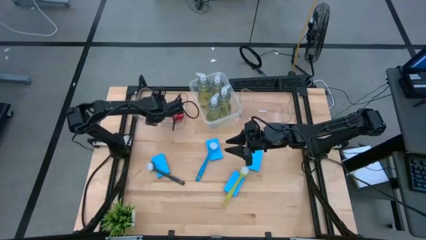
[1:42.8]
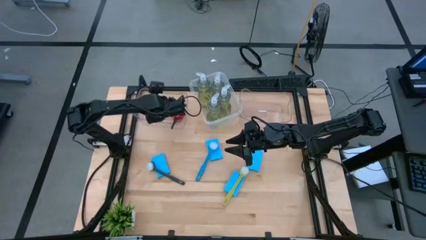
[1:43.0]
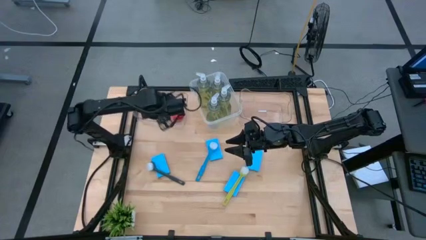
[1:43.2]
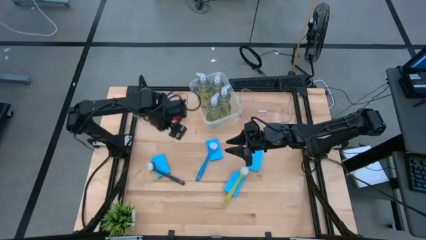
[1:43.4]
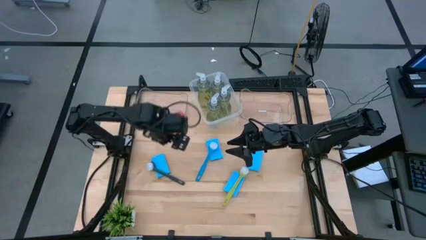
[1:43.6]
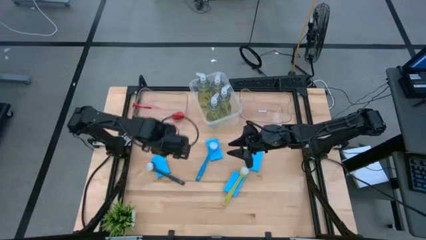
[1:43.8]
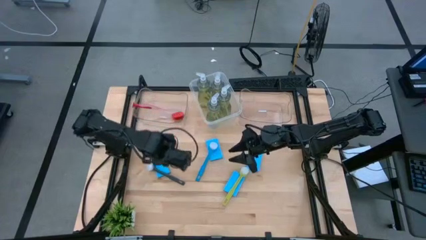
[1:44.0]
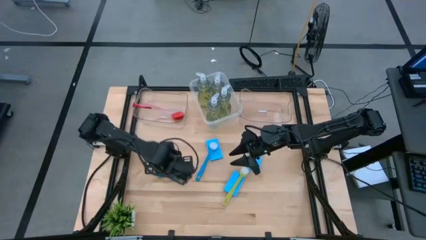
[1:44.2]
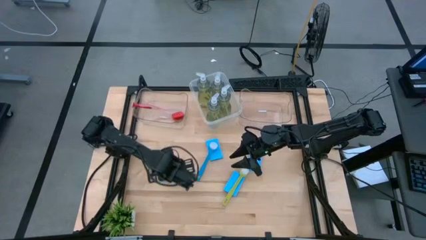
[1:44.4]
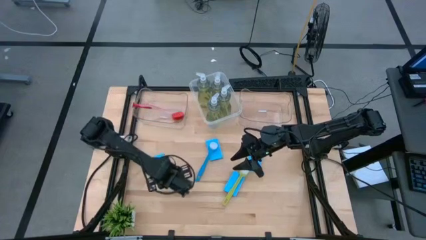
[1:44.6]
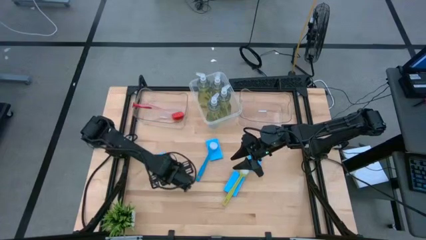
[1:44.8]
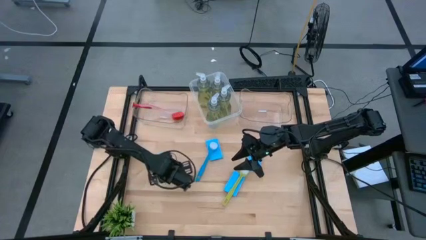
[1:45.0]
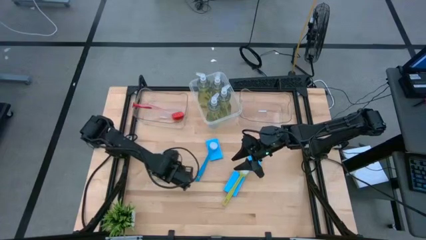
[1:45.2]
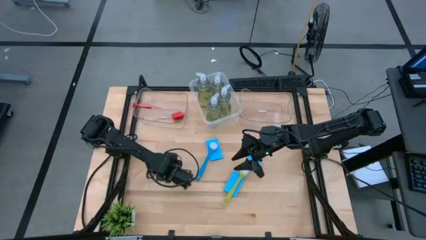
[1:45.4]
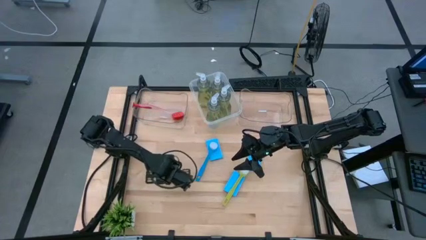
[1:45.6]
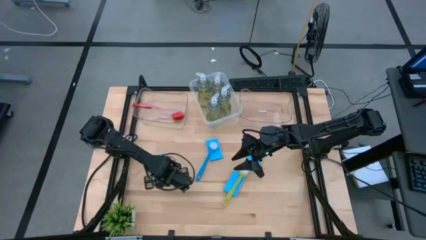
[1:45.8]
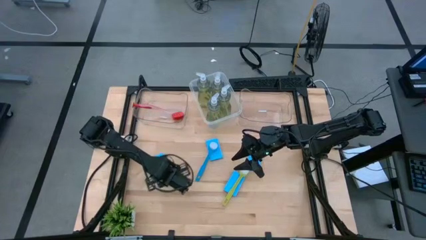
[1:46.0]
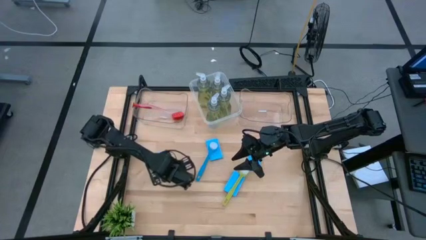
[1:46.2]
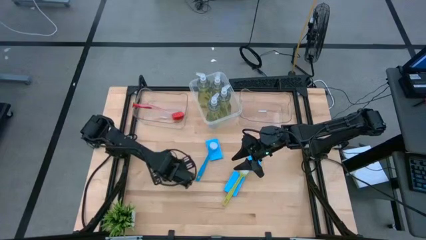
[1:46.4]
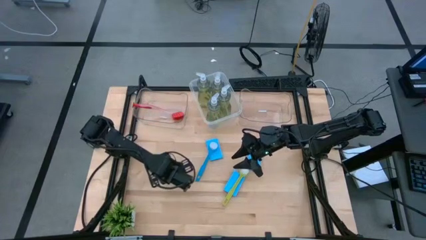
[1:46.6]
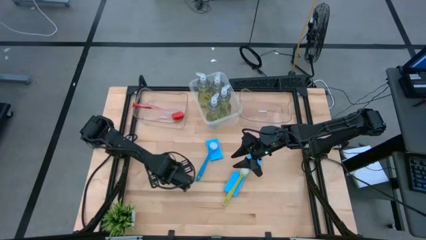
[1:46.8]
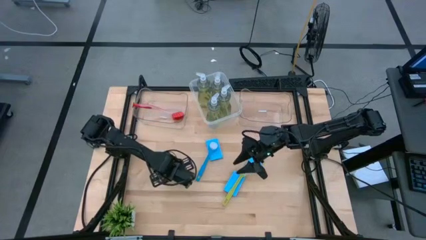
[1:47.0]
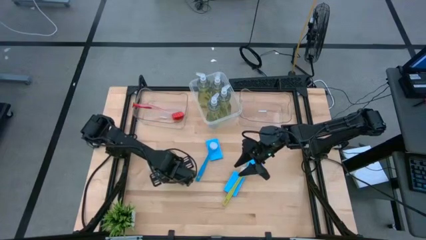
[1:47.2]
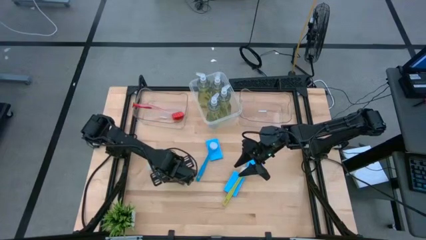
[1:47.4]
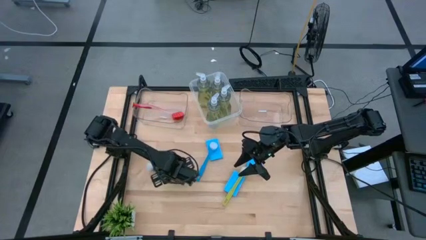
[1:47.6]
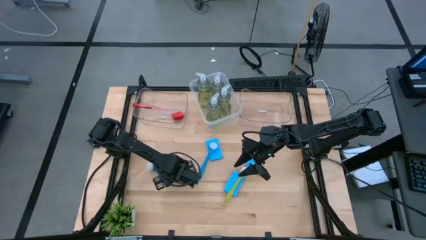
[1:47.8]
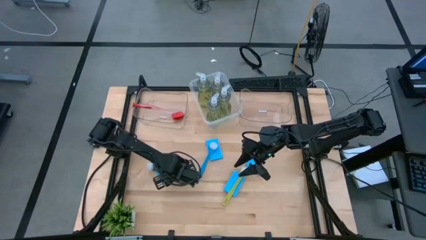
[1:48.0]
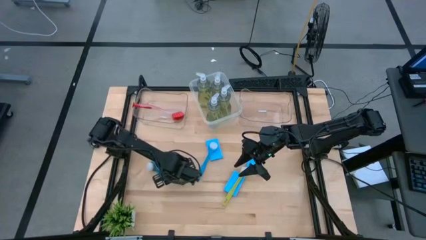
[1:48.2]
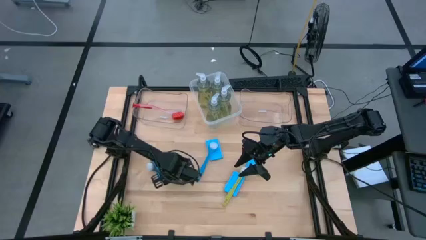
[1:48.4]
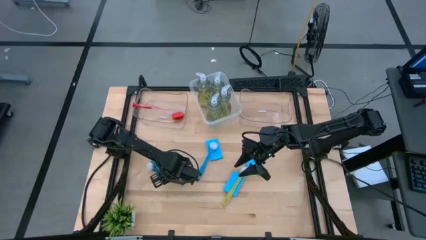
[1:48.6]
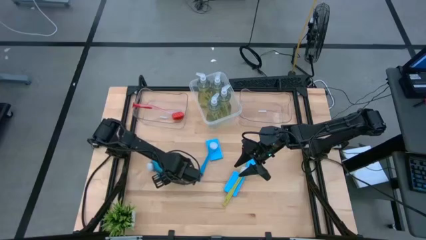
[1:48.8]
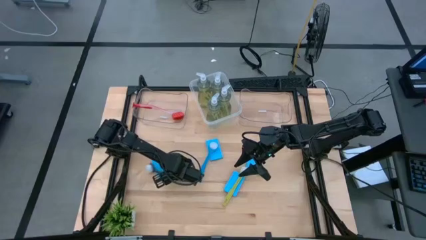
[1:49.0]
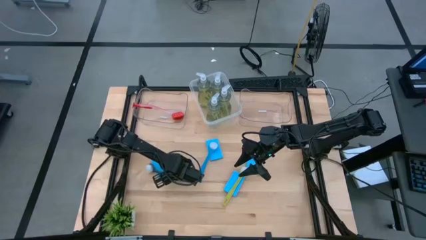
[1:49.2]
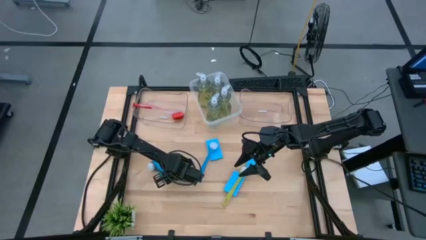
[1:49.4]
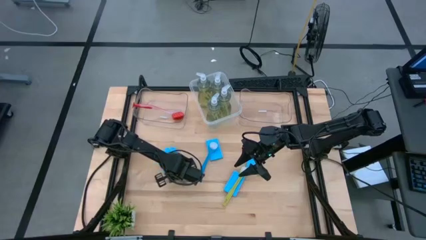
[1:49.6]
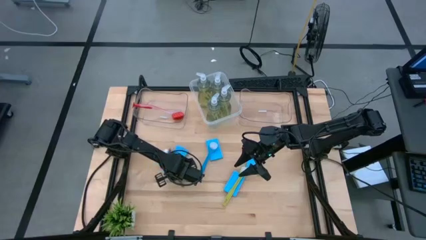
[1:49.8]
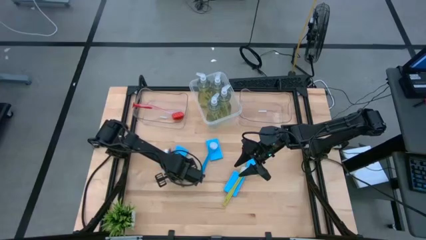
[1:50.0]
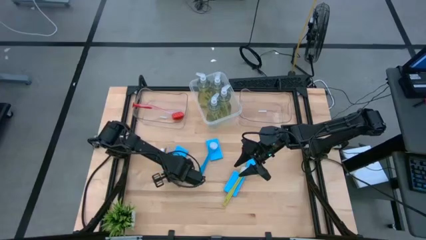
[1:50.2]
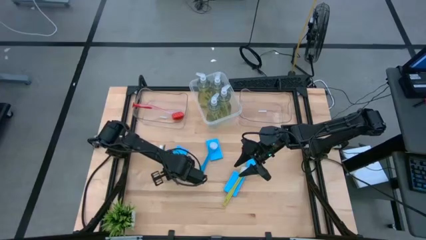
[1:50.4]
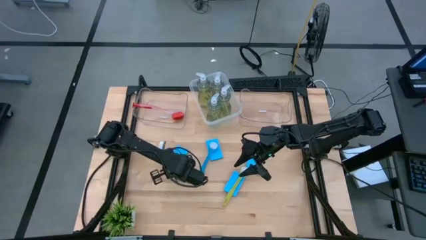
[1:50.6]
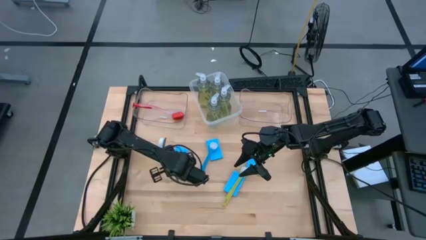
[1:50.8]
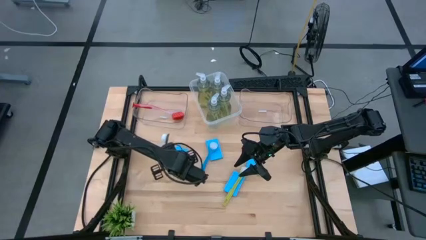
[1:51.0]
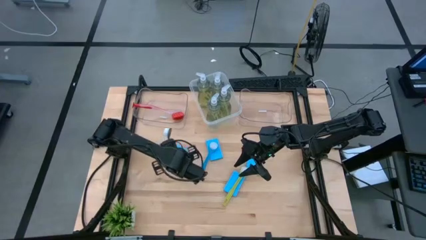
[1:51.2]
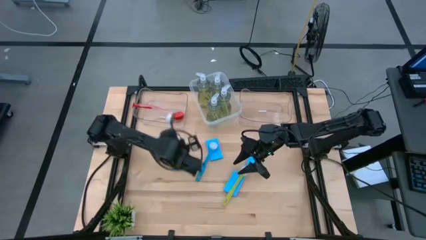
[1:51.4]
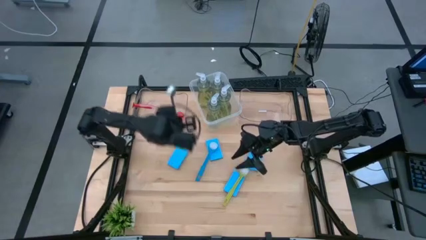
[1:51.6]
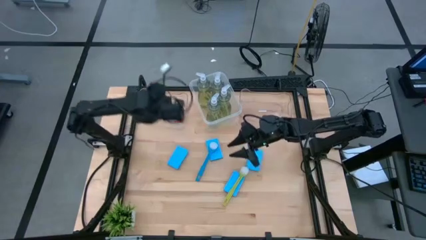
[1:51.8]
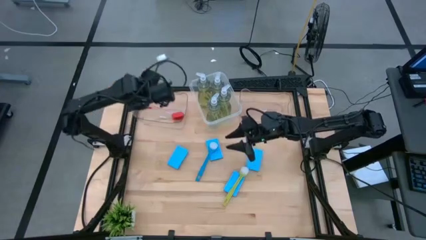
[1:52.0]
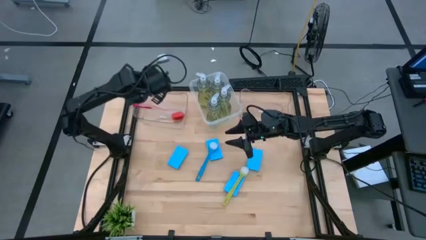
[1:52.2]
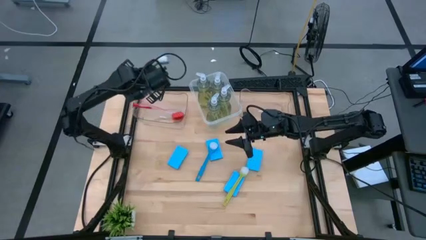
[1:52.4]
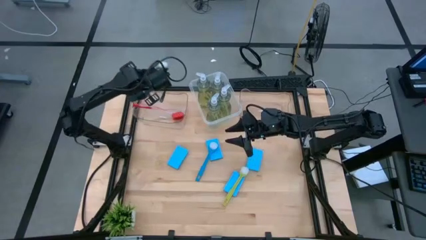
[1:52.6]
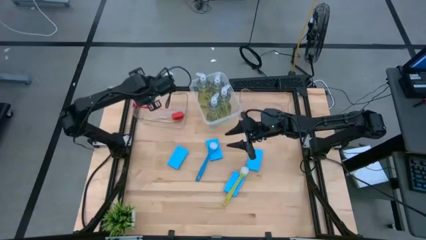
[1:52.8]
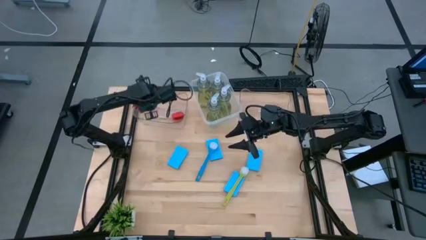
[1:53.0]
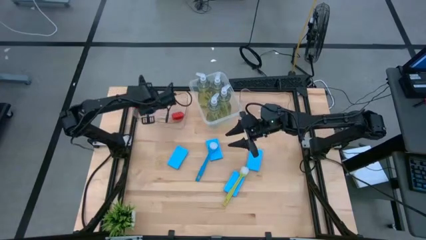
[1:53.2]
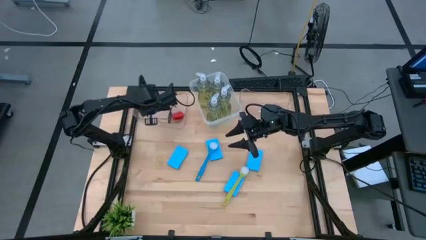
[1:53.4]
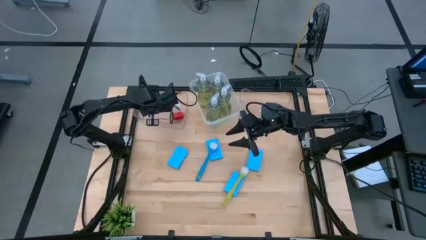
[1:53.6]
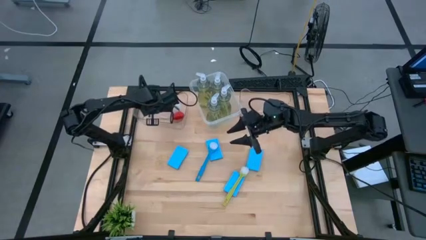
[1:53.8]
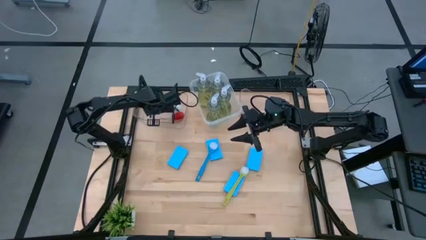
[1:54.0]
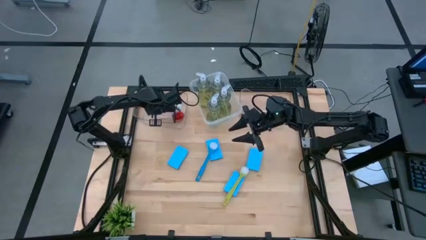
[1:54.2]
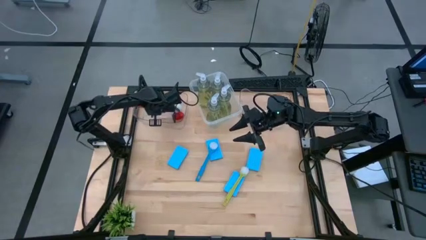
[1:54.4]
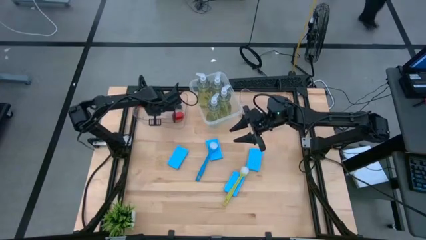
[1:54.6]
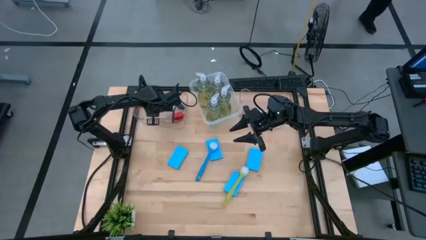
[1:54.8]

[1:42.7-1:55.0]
Task: Pick & Place Kitchen Sink Supplies
Put the black cleaning brush into the left transparent bin
